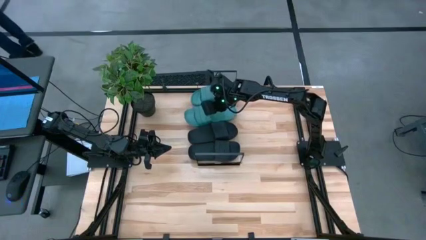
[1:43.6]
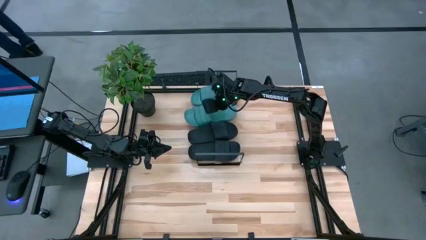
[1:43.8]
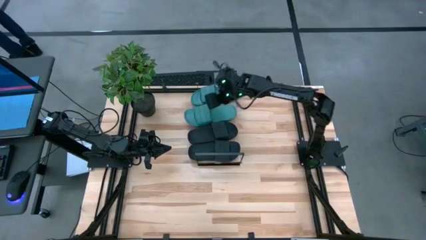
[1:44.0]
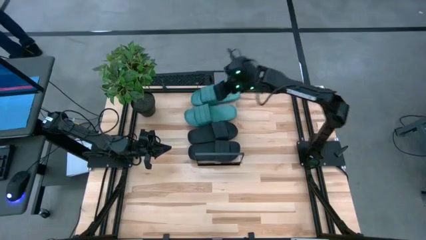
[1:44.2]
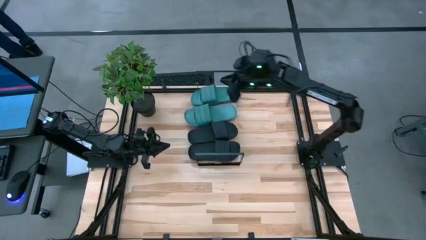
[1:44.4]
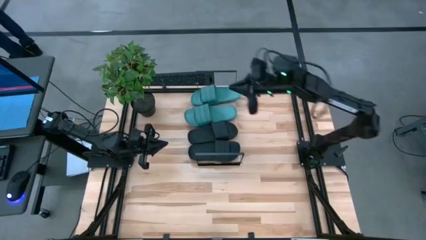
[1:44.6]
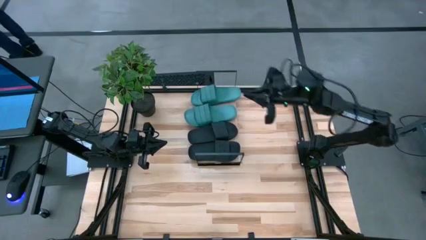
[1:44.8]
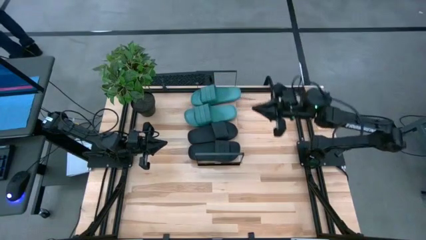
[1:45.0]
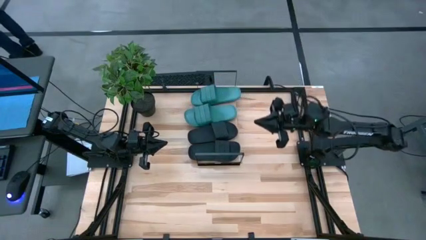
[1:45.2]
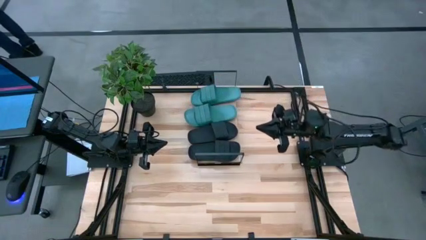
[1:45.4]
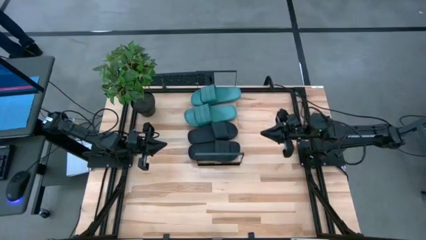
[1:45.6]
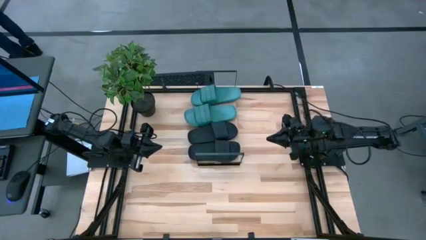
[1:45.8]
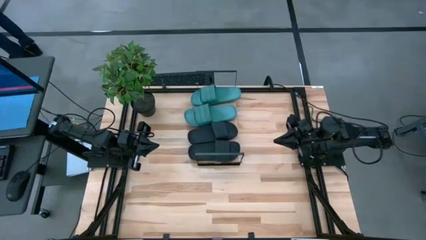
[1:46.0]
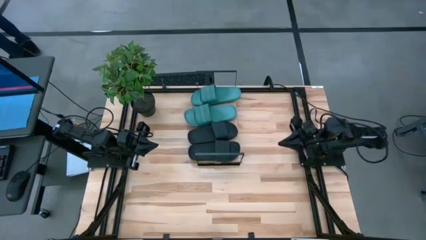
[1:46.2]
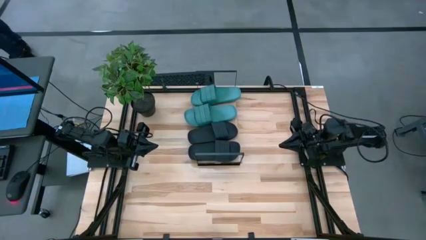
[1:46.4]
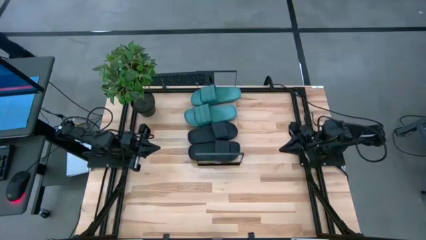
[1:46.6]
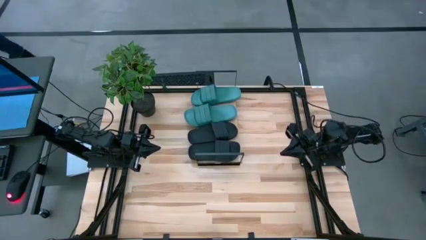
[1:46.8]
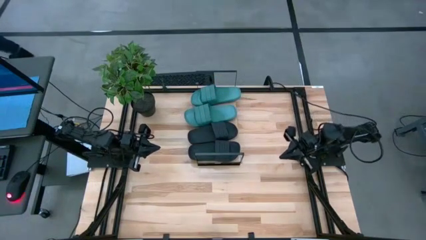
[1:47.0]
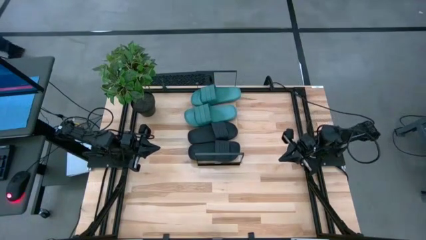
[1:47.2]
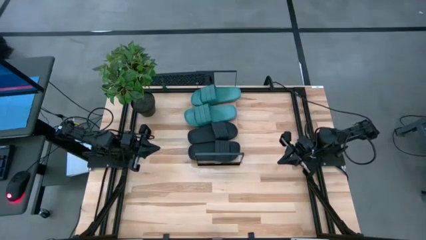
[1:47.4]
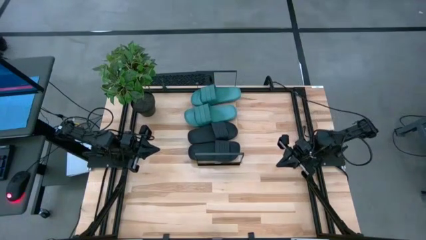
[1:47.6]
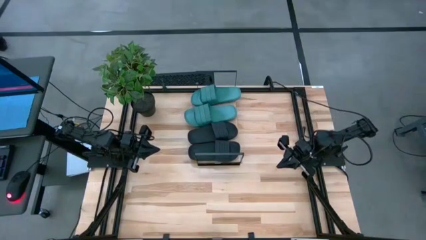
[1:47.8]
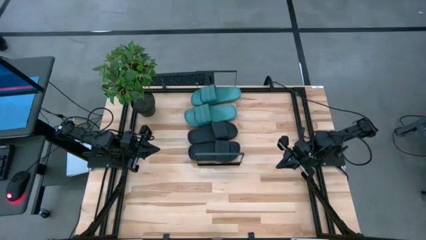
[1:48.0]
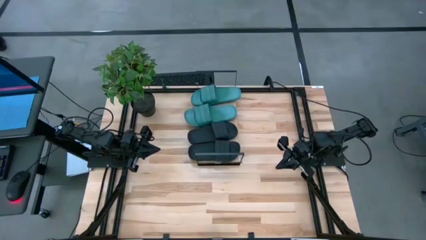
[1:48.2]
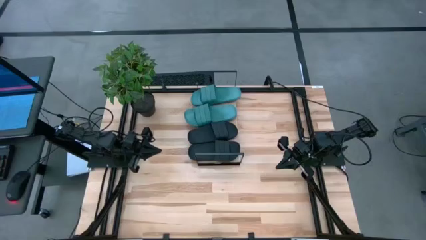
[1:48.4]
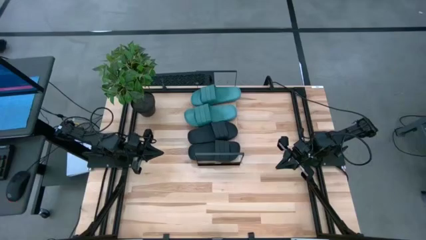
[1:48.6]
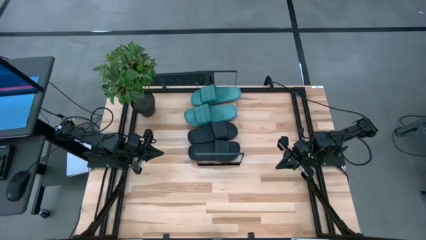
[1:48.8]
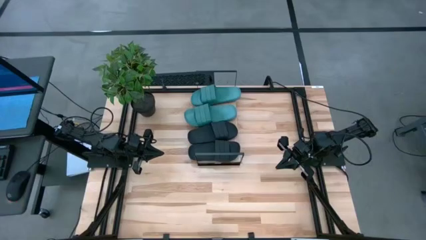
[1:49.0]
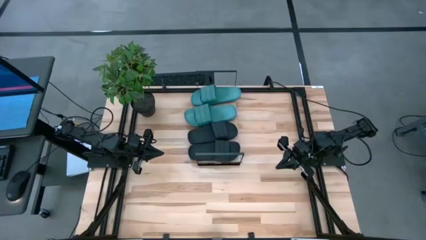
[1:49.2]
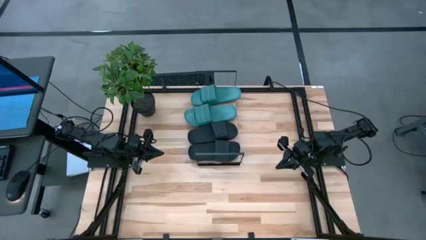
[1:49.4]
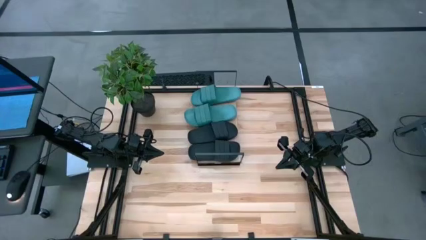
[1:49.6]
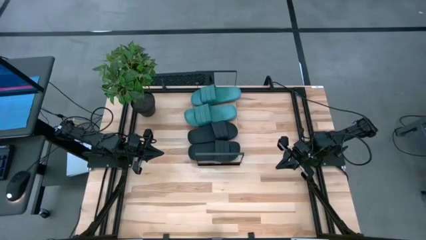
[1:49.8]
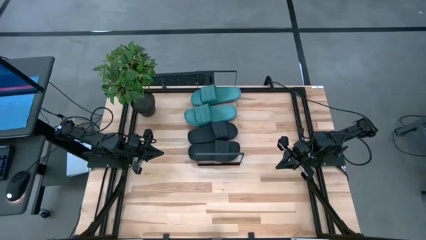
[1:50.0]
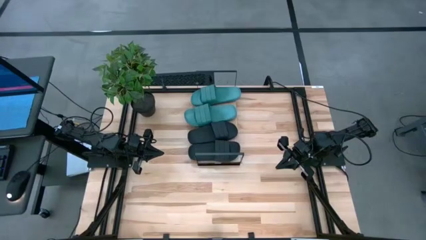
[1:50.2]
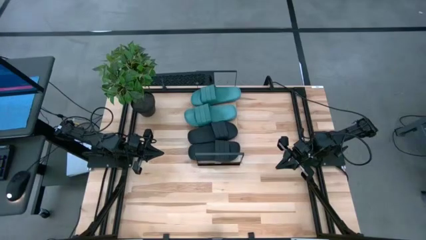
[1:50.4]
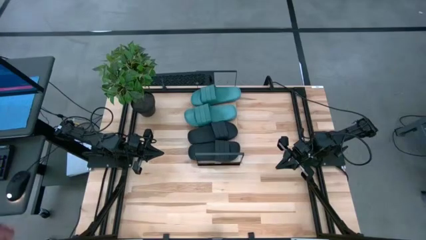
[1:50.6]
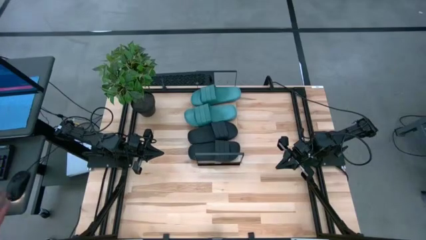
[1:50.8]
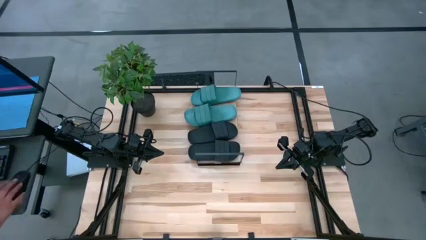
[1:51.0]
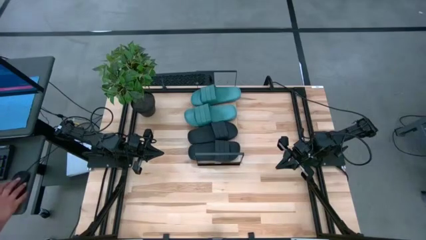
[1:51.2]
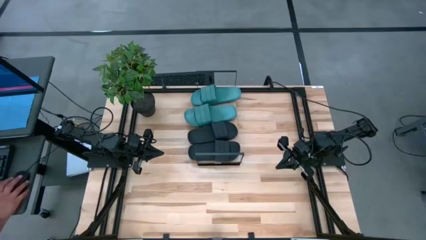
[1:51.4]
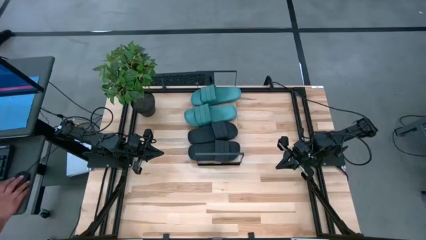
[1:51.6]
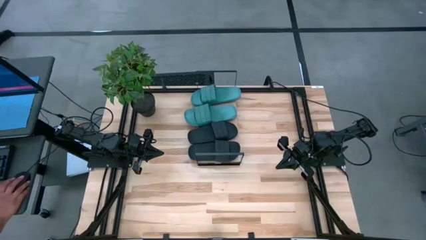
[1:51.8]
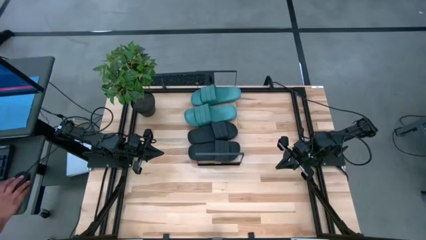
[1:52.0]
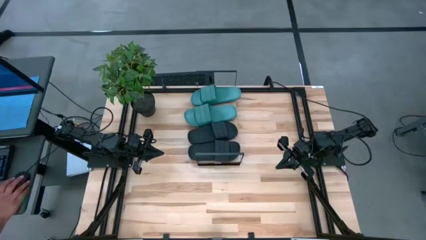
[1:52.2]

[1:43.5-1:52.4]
Task: Pick and place slides into the shelf
Return to Home Position

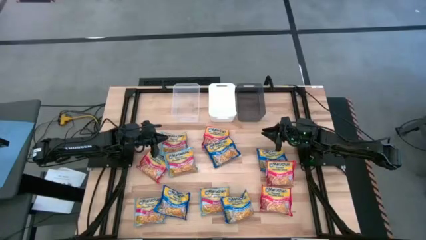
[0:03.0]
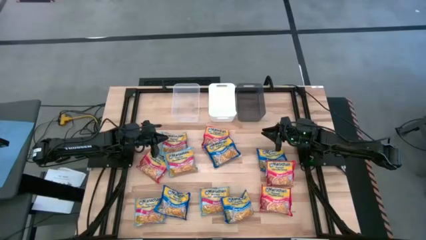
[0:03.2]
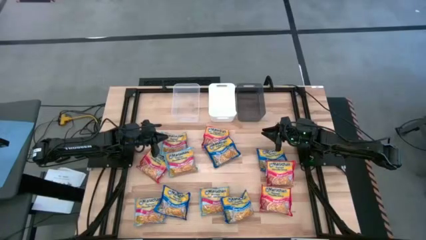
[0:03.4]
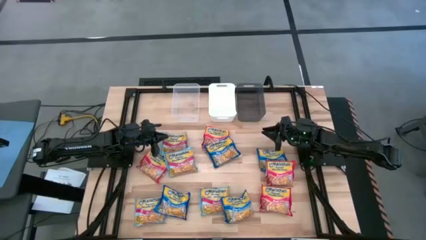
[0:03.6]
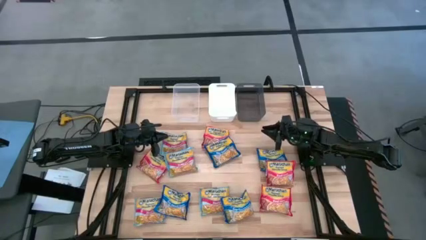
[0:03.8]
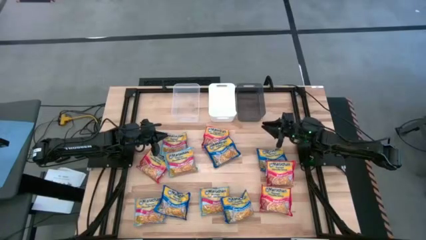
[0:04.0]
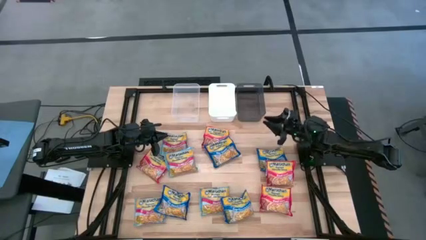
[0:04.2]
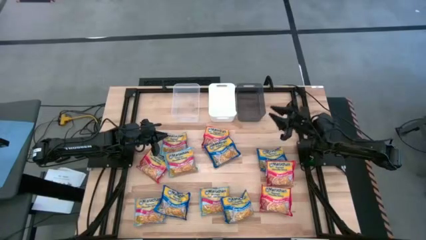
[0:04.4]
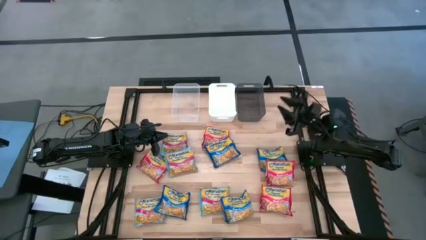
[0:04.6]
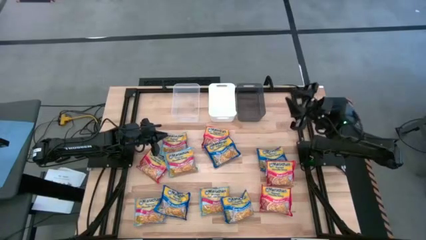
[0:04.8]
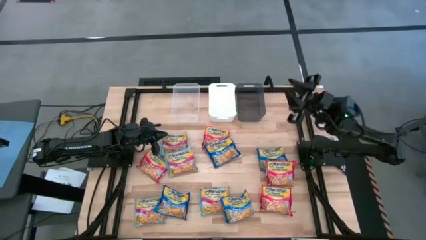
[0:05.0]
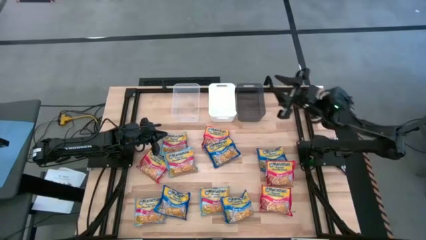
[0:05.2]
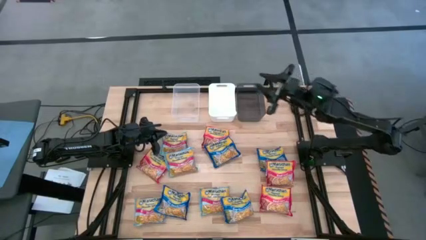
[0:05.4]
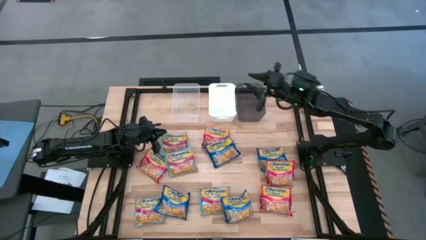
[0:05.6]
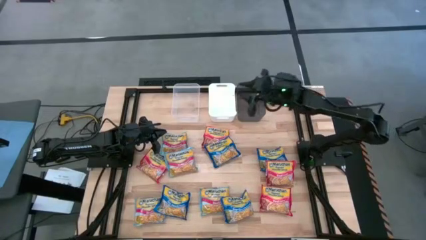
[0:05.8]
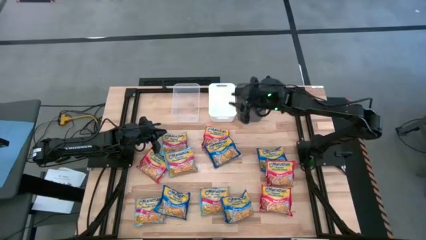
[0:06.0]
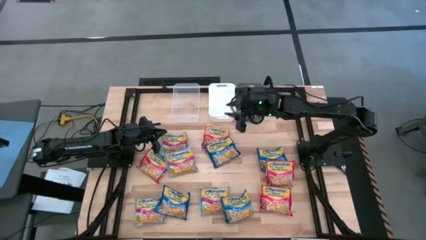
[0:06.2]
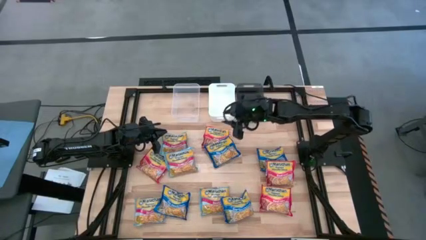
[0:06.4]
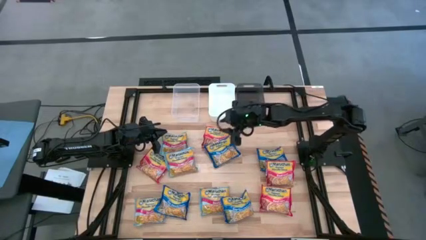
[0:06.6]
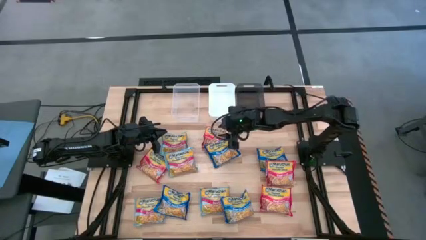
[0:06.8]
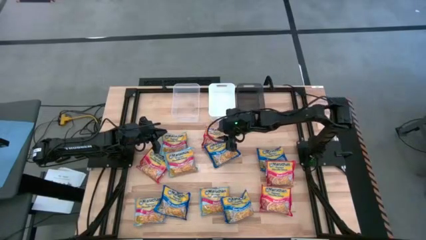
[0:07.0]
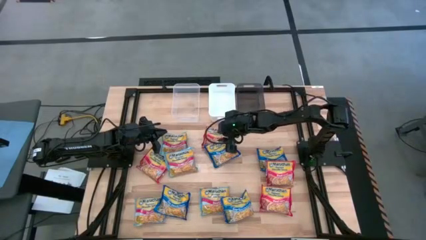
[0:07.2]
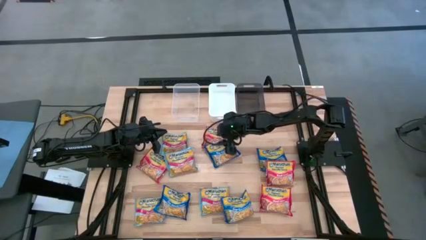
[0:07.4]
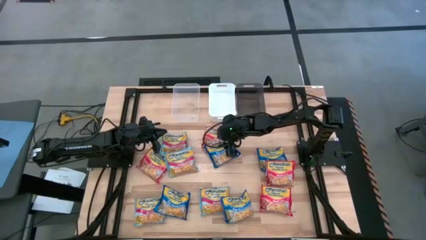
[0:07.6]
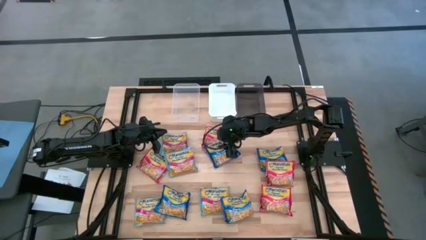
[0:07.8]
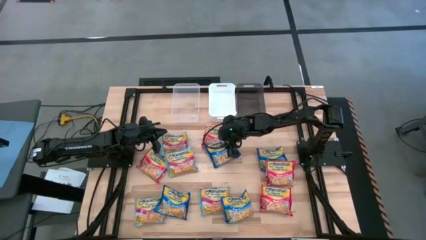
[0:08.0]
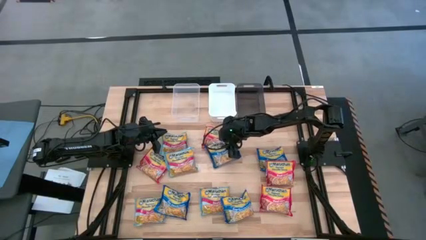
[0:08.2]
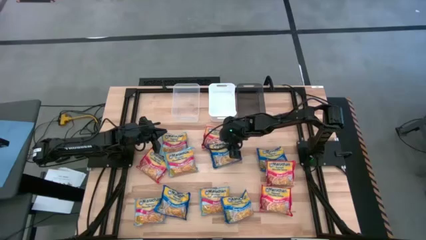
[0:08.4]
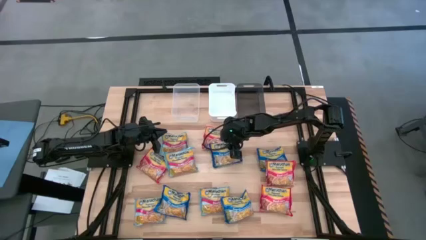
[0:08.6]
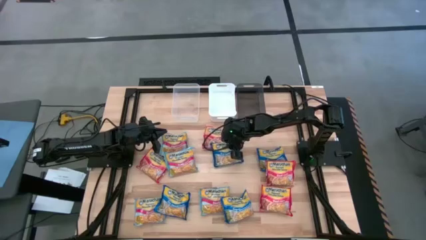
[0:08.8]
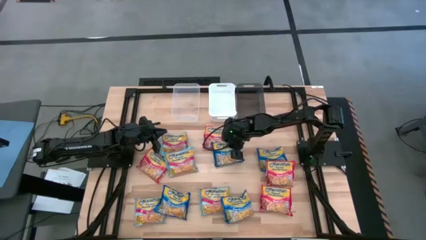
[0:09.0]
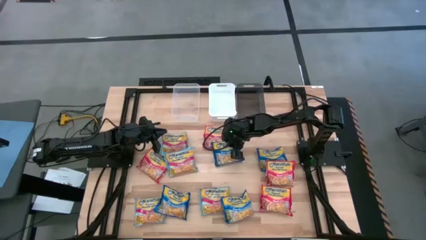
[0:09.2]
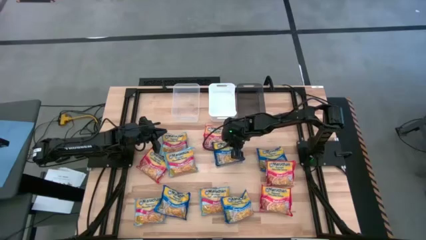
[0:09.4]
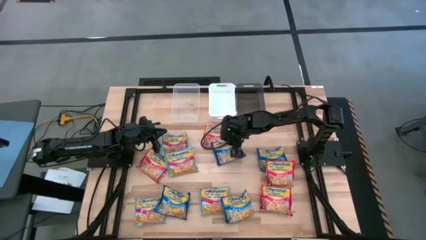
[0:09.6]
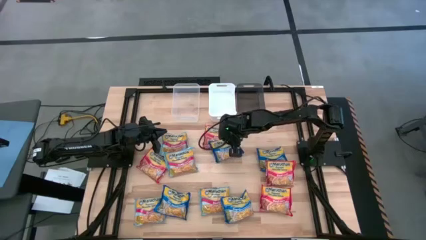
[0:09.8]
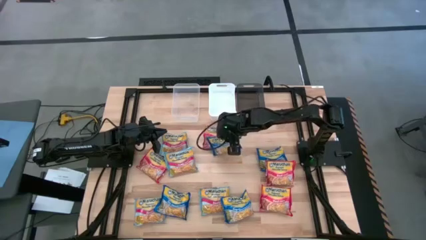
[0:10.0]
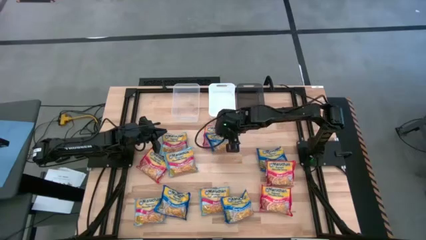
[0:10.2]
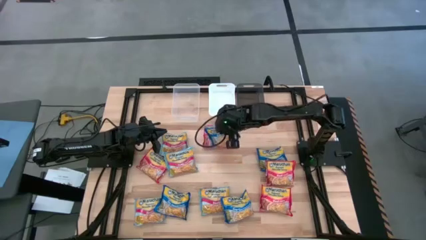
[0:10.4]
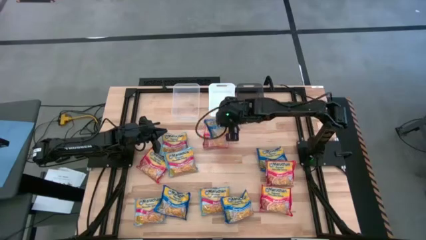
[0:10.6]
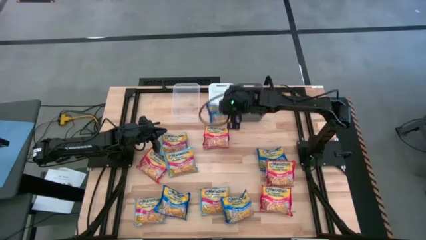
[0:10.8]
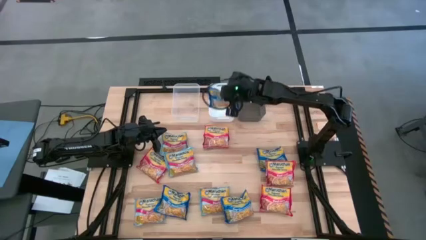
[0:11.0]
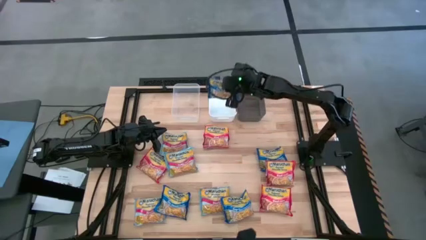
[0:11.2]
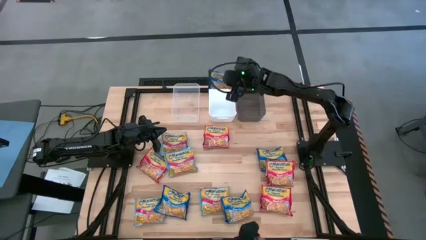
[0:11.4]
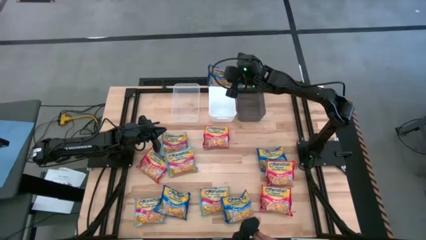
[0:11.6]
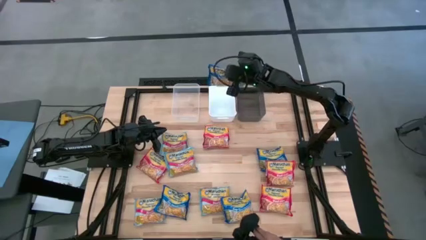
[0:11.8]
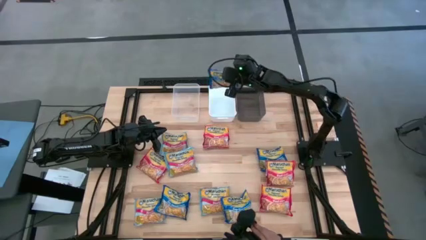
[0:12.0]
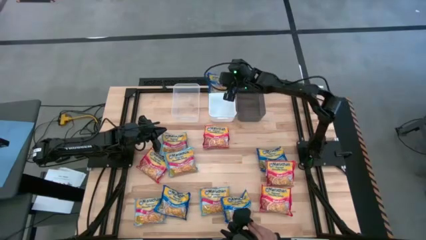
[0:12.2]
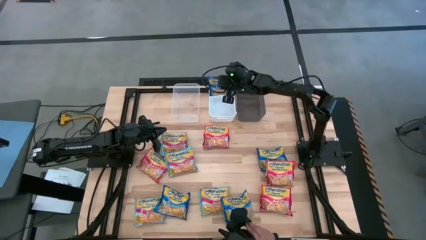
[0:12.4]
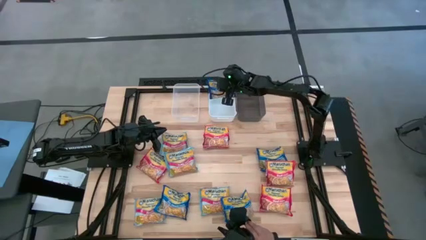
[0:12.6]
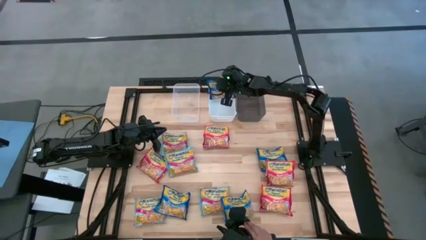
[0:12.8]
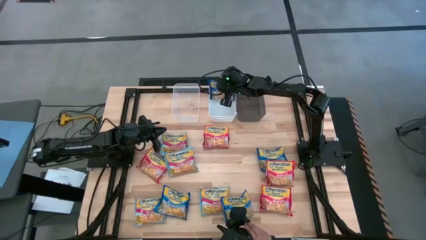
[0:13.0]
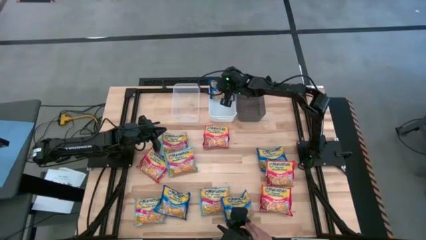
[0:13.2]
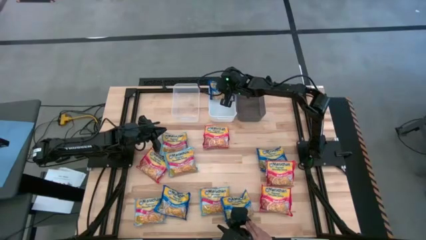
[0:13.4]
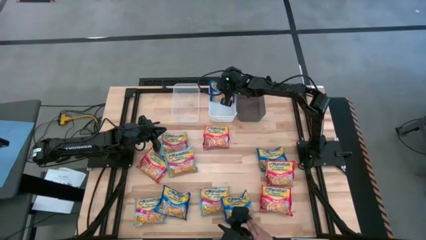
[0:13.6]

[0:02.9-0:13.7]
Task: Sort Maruchan noodles
Put the blue noodle pack into the white bin
